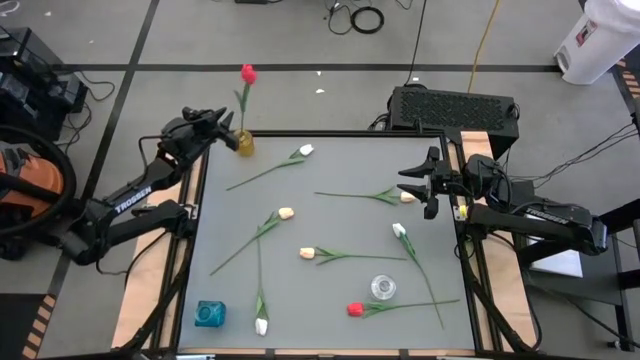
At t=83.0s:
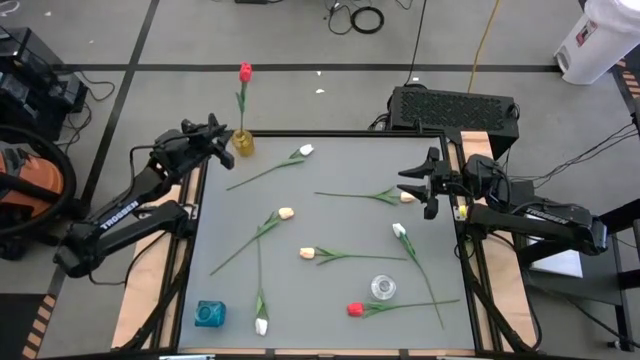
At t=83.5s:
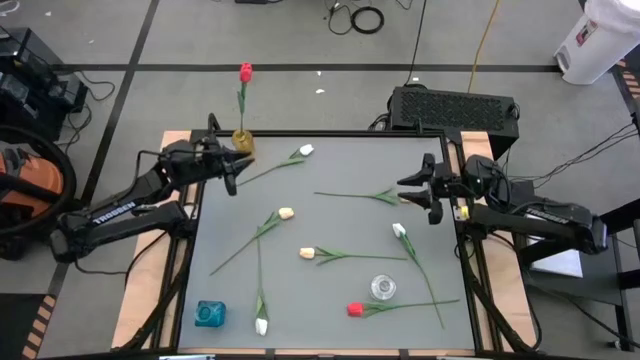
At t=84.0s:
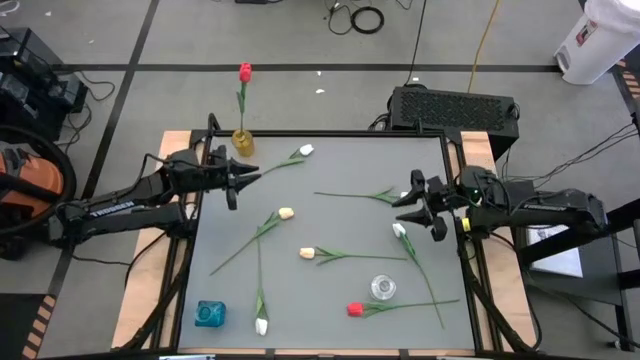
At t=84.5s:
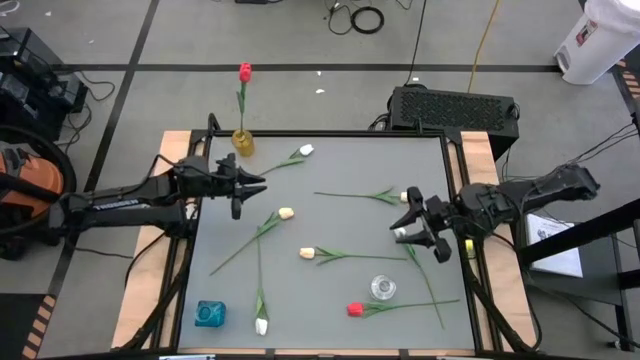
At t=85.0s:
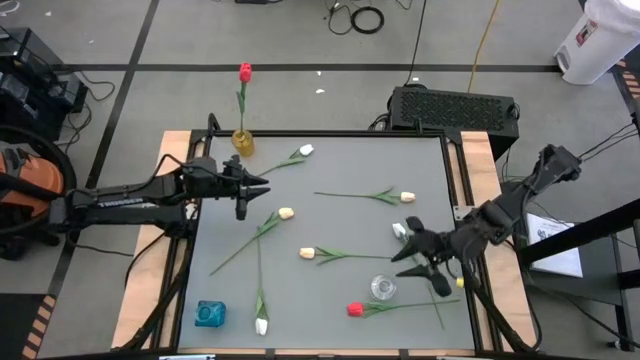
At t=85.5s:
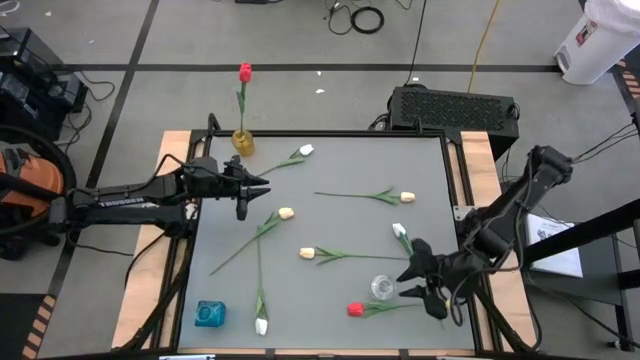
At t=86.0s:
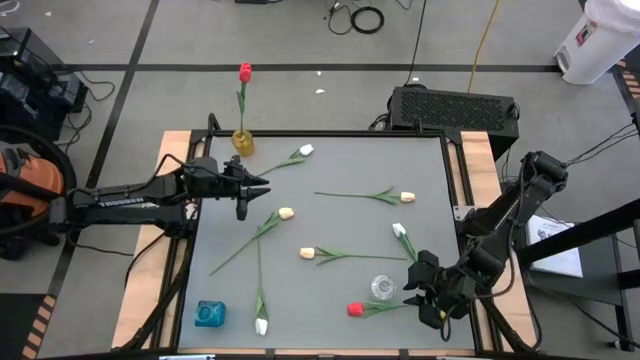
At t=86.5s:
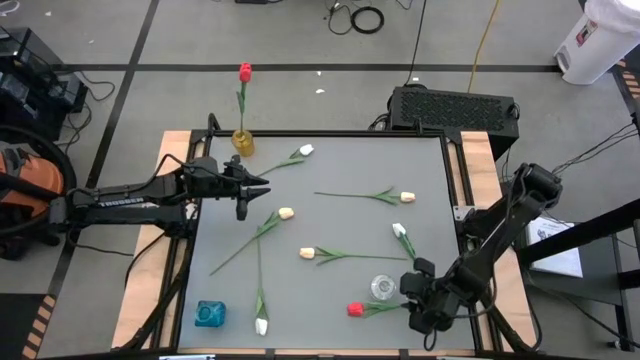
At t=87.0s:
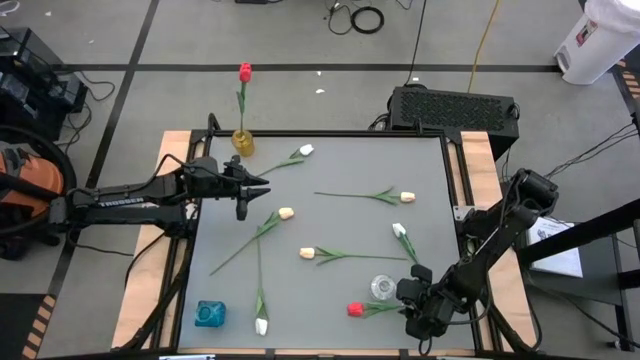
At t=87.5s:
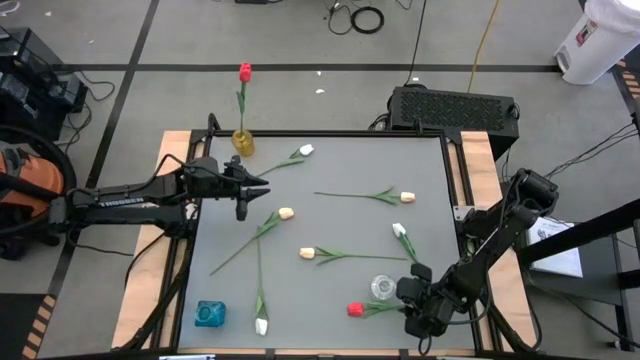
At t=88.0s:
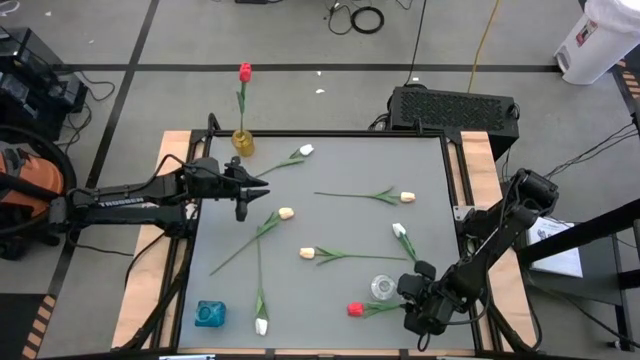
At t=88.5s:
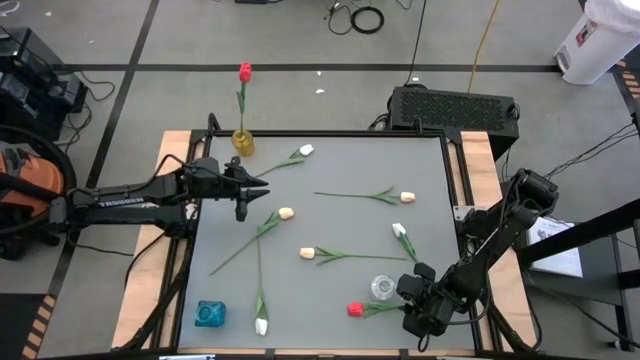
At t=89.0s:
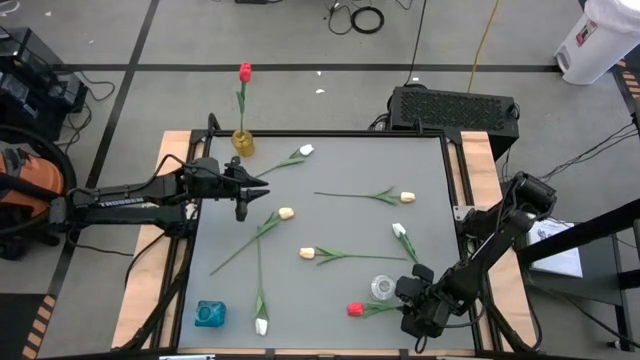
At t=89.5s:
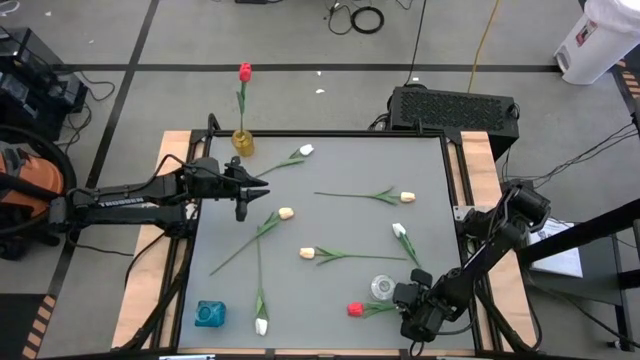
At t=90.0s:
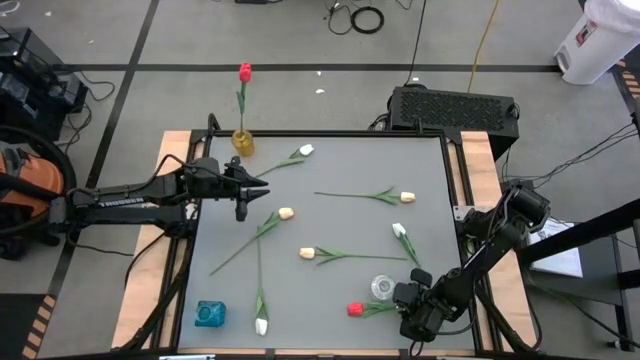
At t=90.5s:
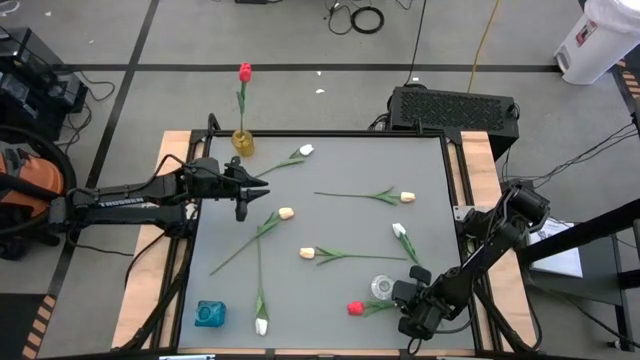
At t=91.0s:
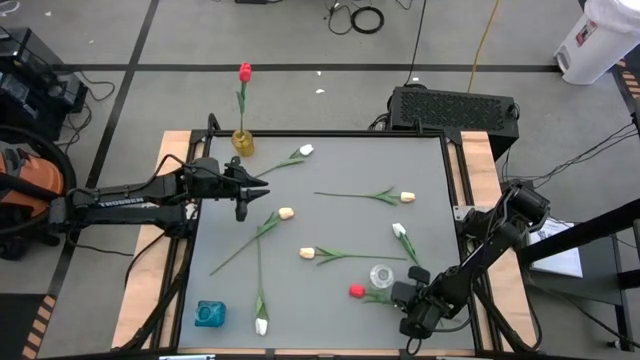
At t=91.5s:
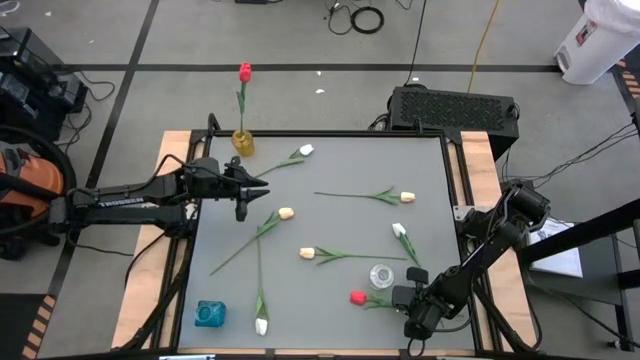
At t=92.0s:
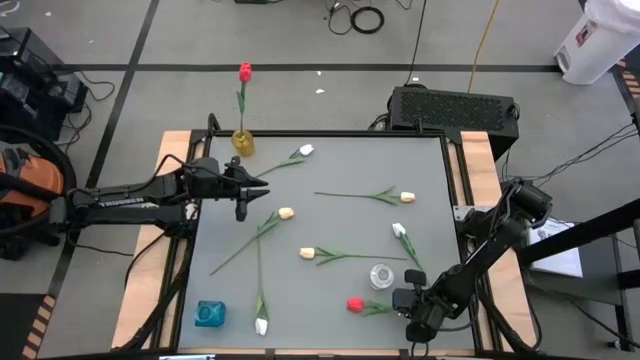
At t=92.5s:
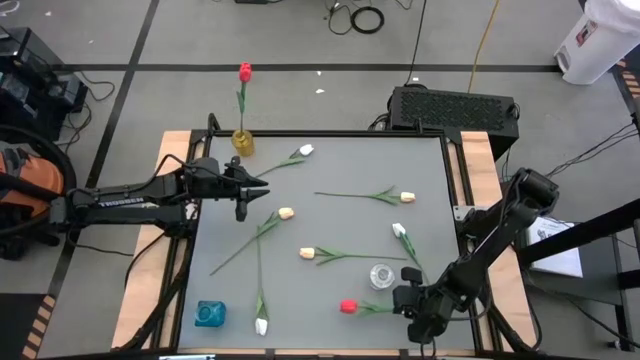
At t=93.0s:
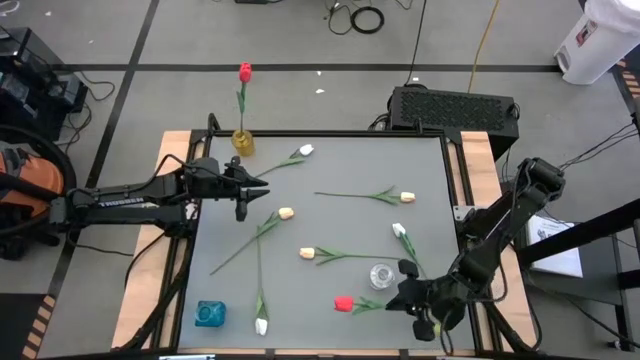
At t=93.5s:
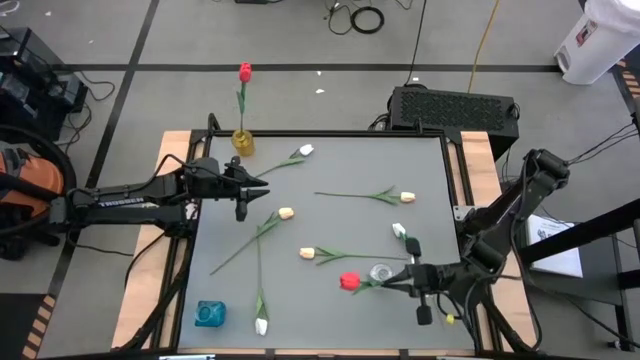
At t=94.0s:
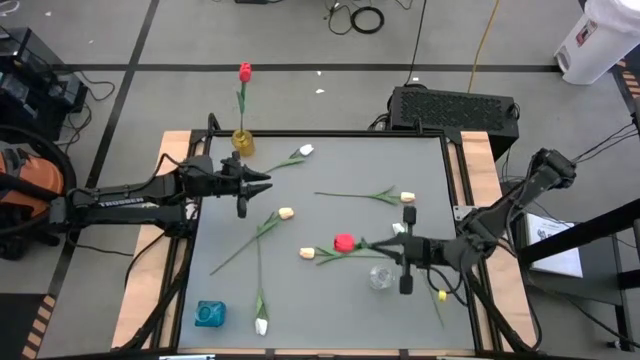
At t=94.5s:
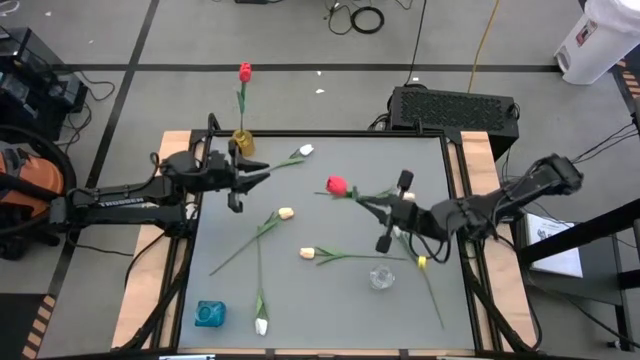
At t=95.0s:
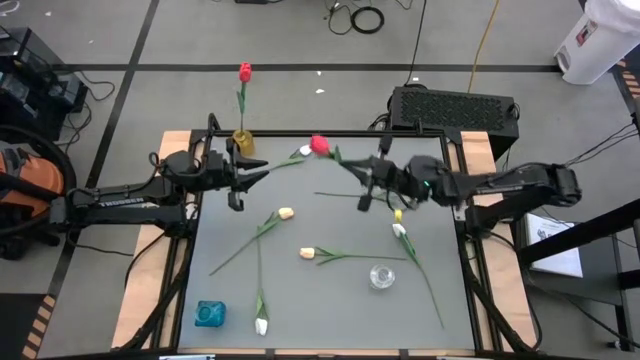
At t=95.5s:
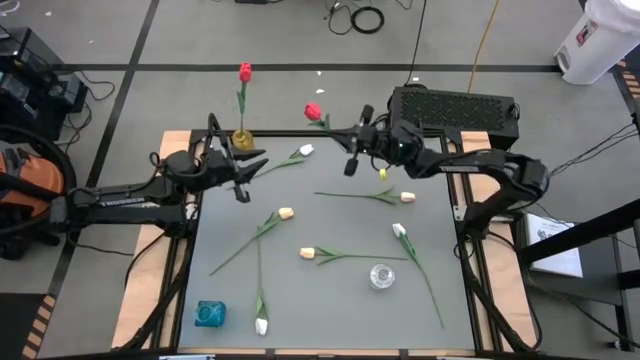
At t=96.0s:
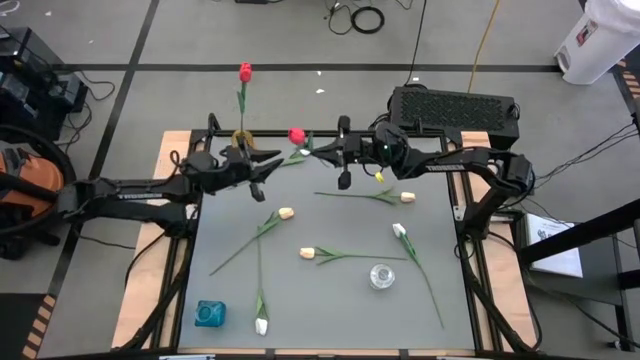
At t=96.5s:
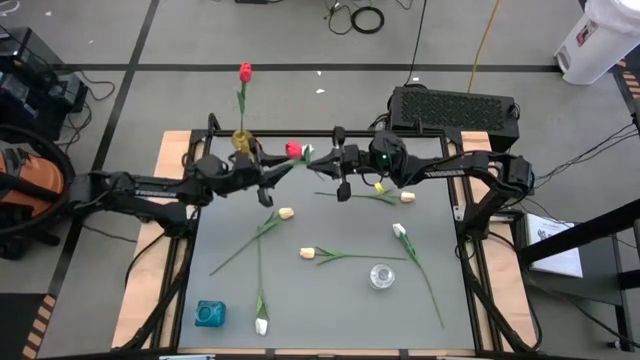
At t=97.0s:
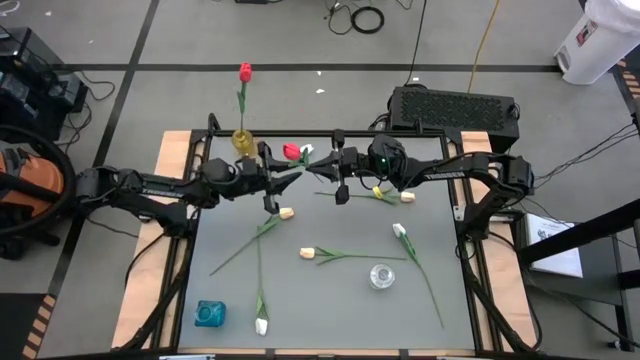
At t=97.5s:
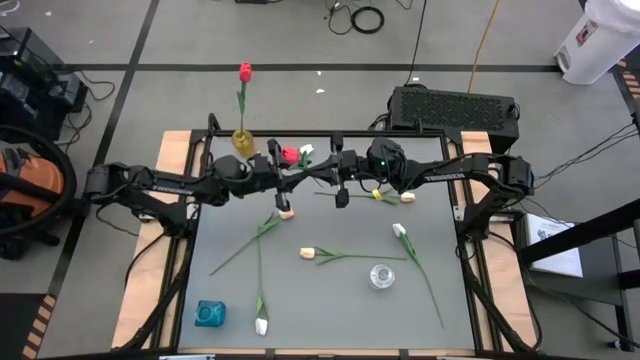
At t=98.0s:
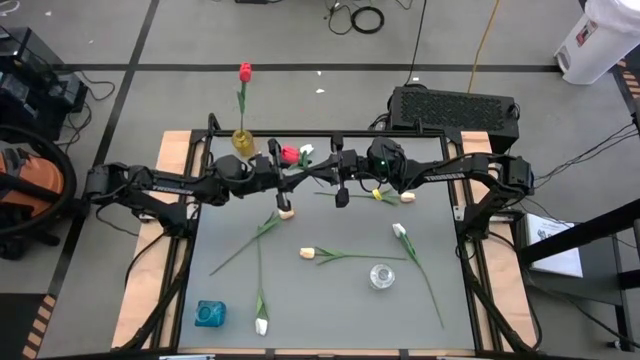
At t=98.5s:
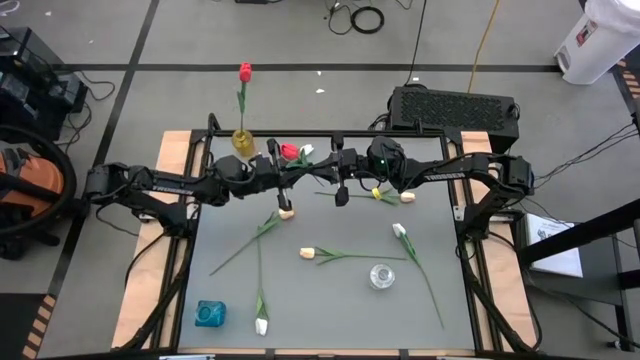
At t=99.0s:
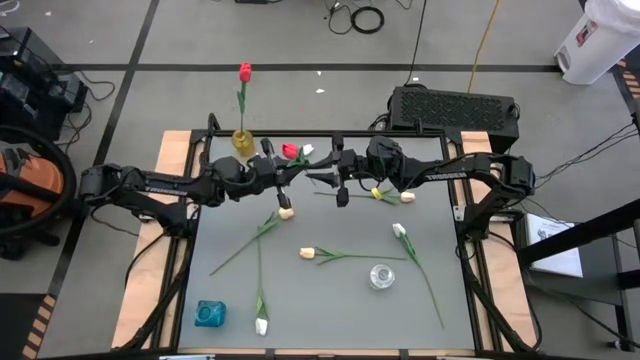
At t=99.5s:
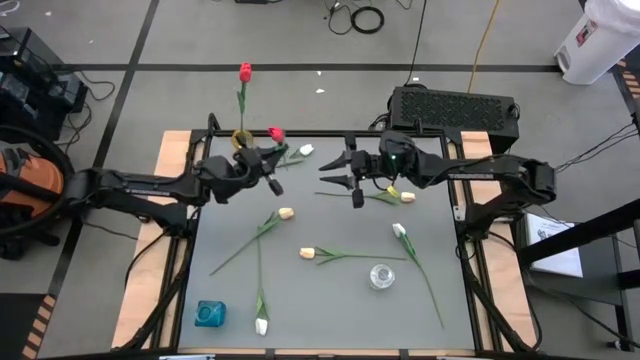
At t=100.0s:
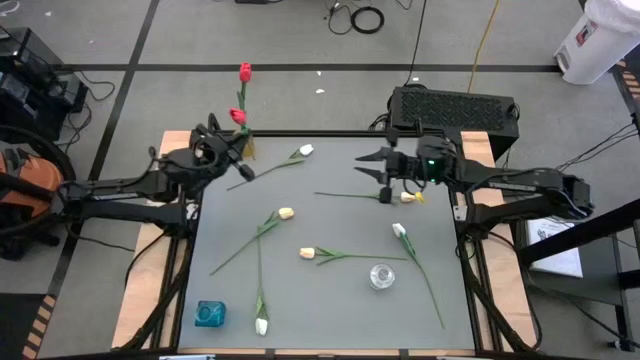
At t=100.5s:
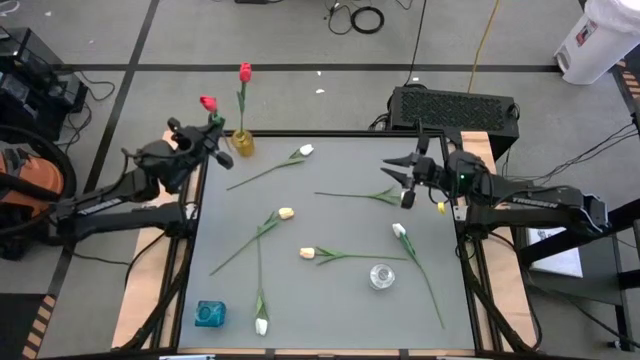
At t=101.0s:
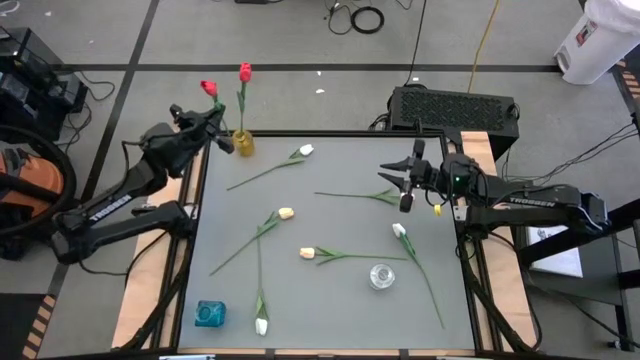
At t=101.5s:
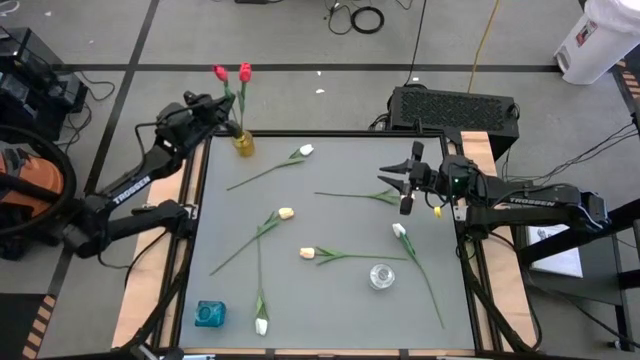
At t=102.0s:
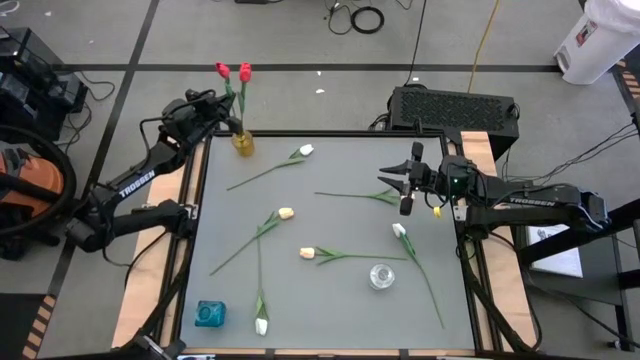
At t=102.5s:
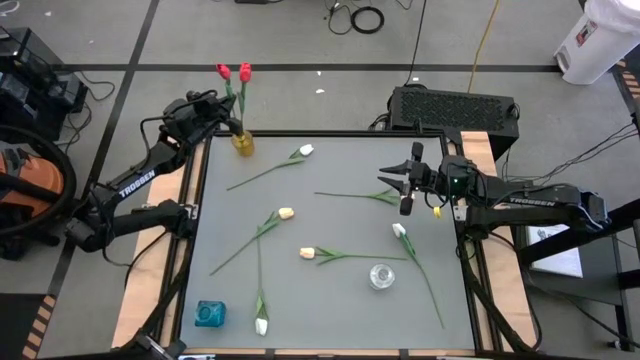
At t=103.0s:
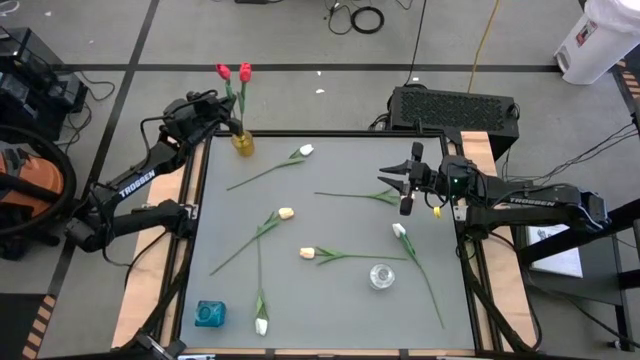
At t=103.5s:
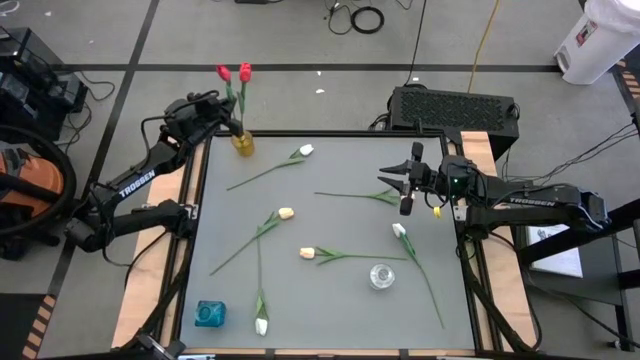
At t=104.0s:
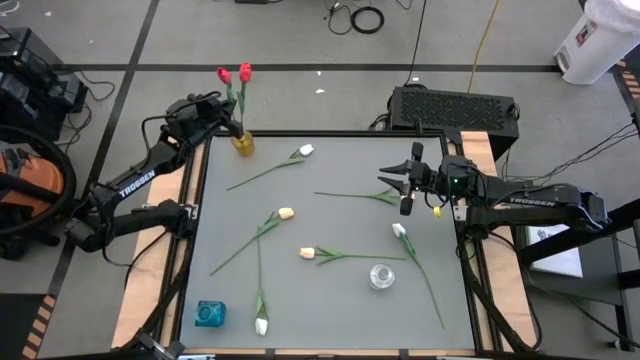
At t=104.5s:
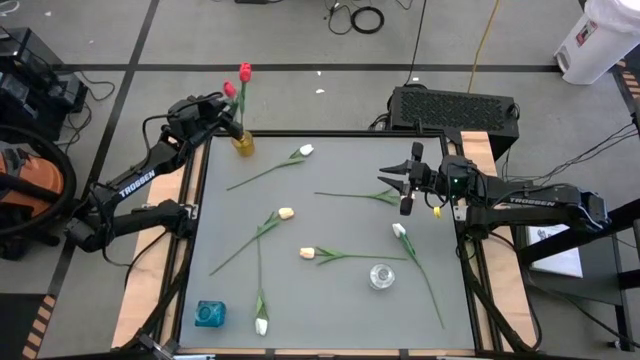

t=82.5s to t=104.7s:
Task: Sort flowers into vase by color
Put the red tulip into the yellow vase
